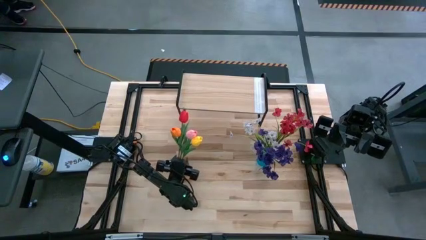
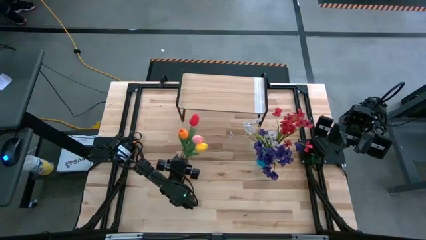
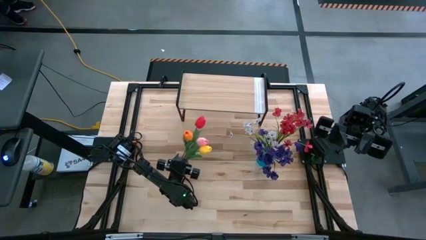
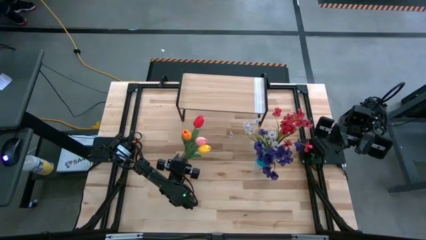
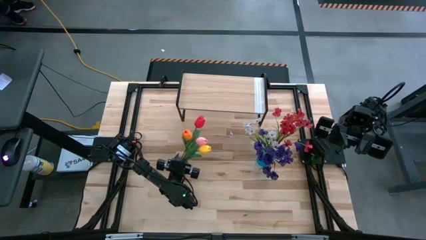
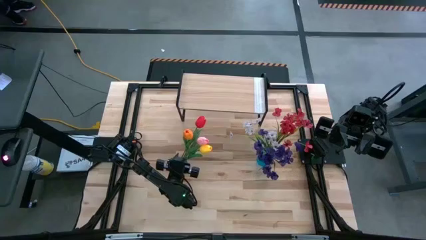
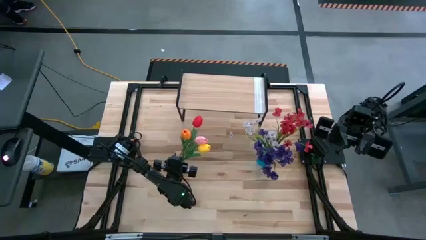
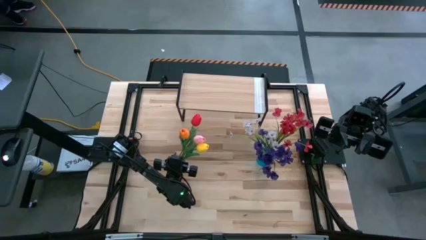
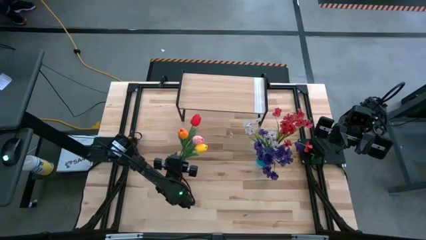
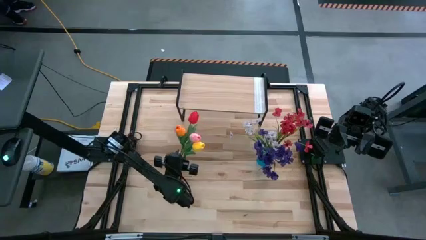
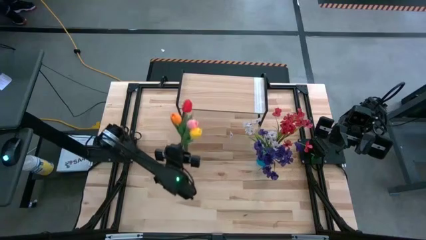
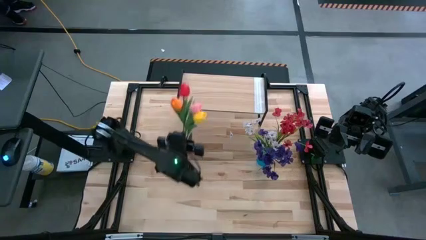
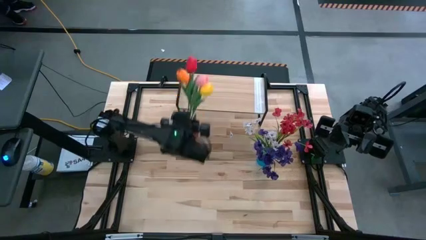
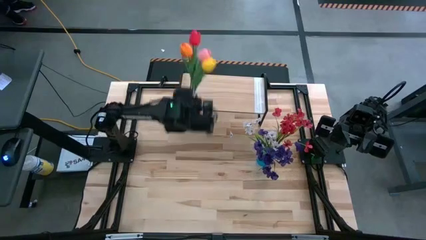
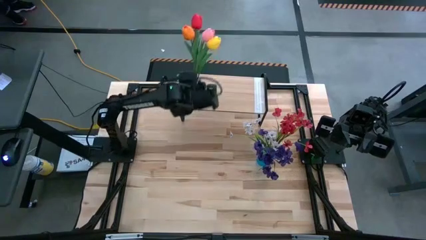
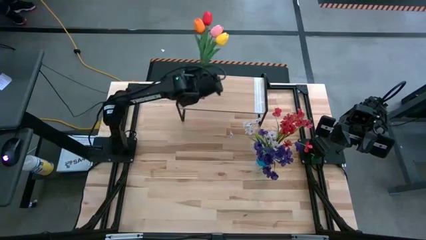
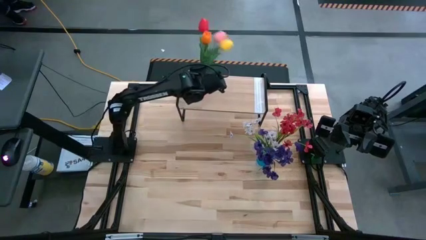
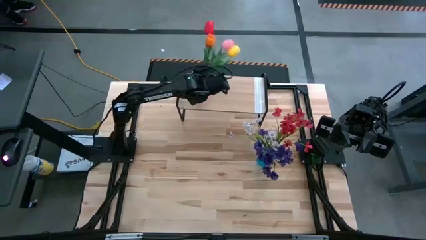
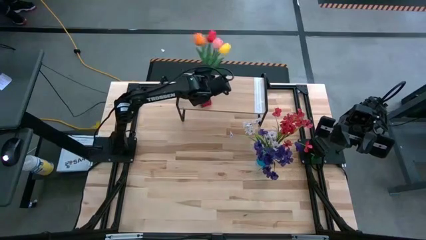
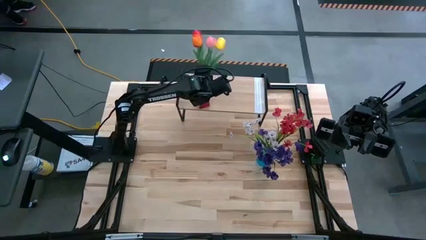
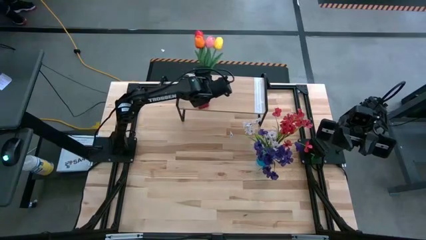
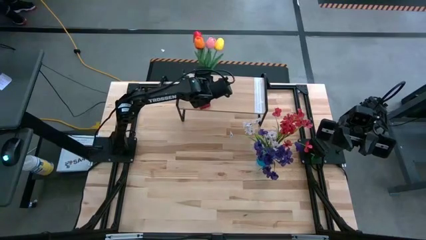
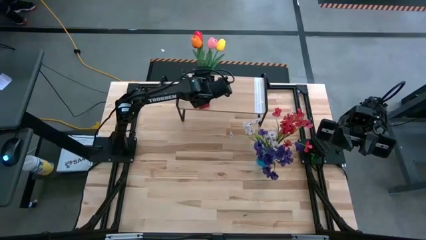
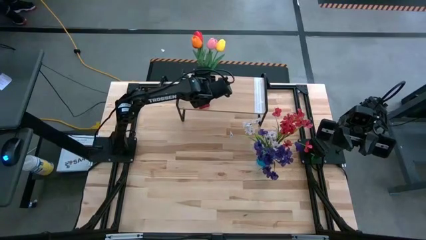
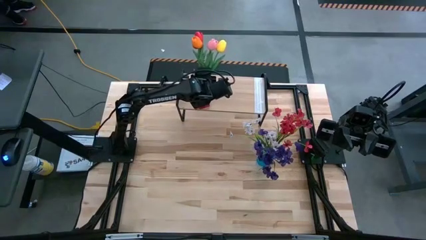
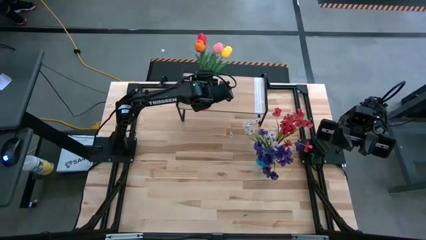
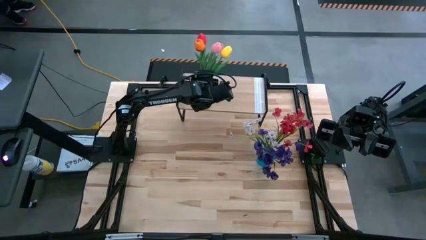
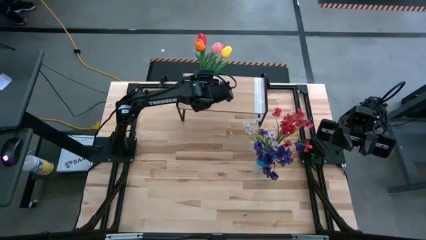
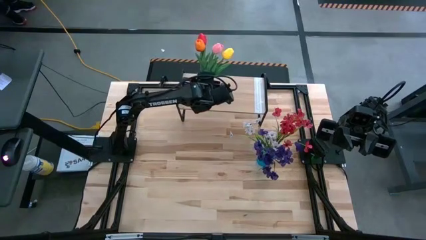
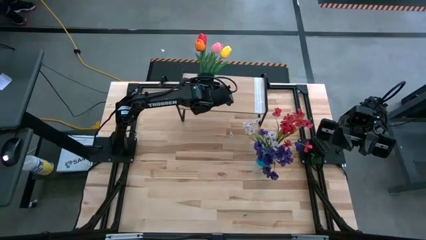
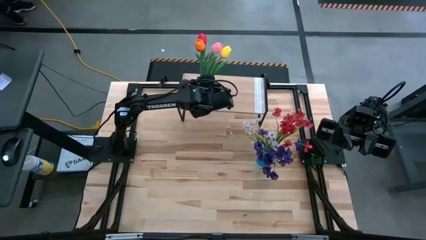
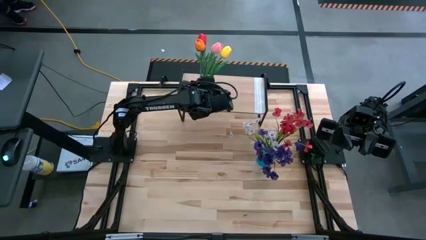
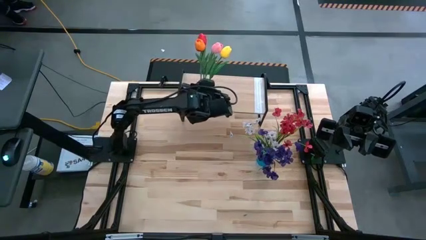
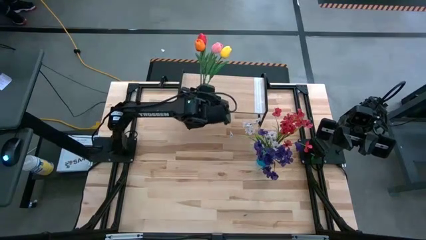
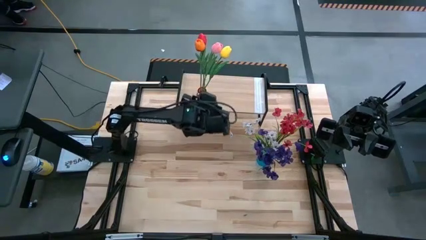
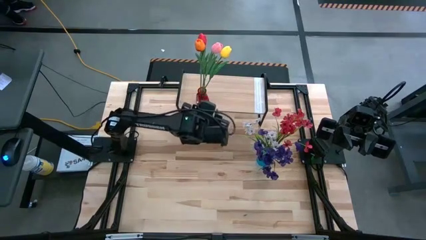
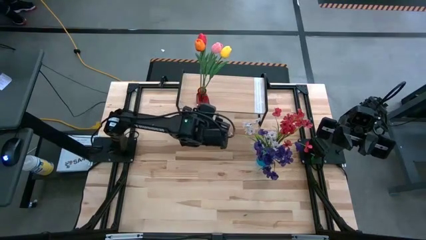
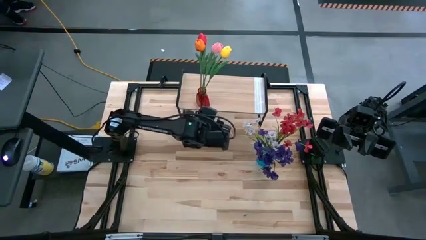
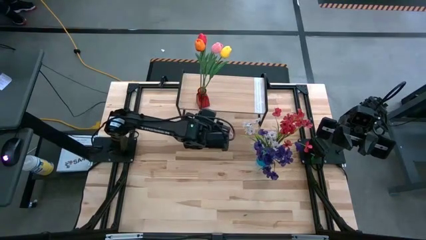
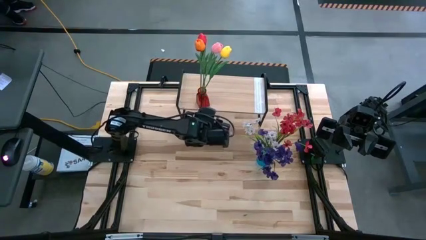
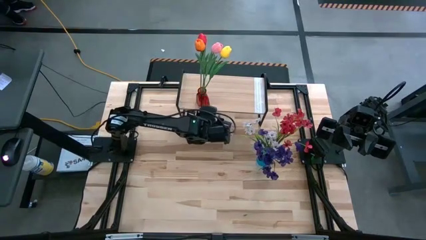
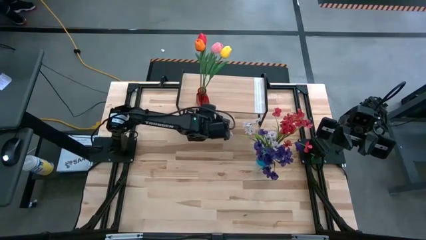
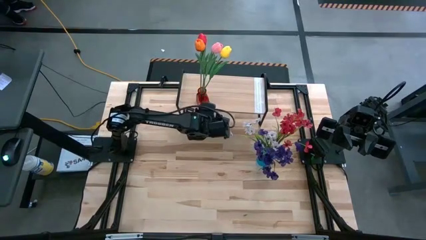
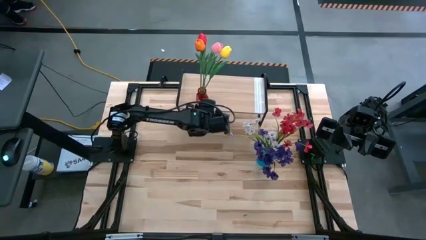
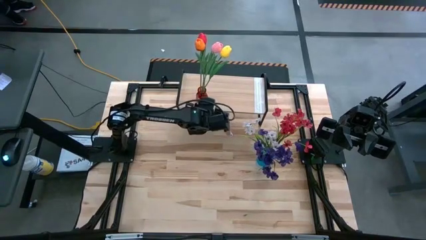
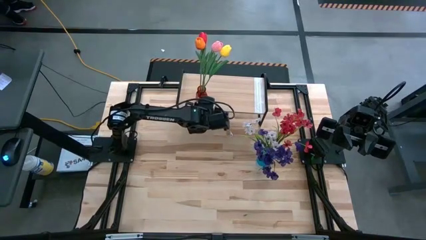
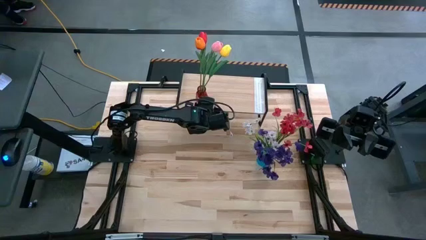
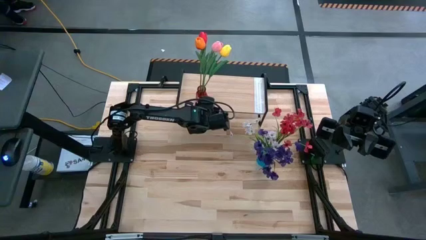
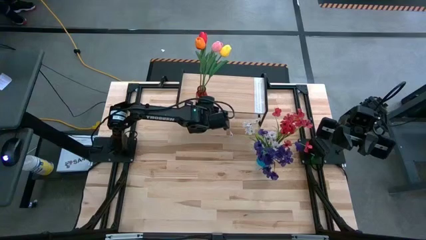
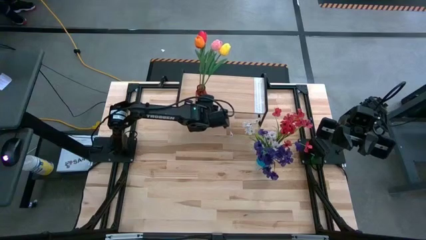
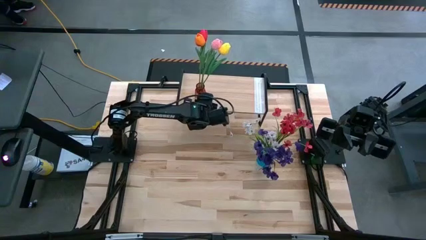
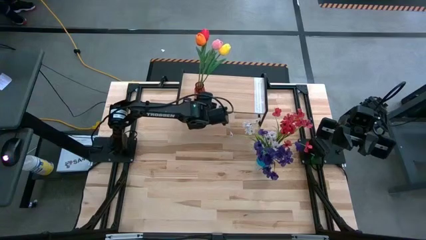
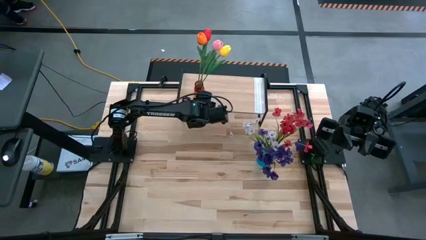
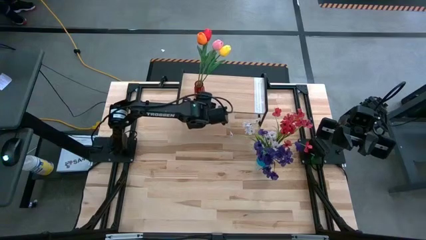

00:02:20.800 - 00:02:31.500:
Task: Pick and place flowers into a vace then onto a shelf
Put the red vase with flowers on the shelf

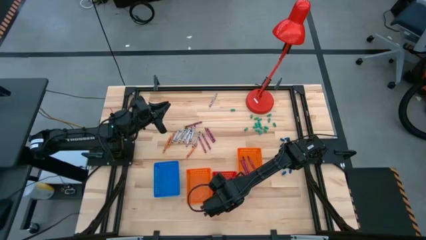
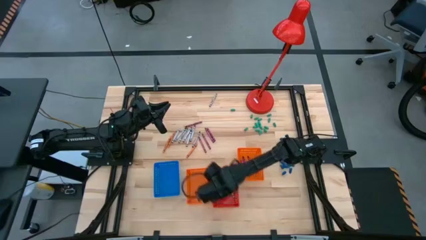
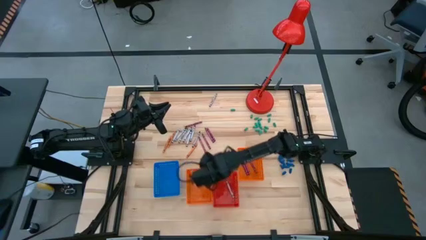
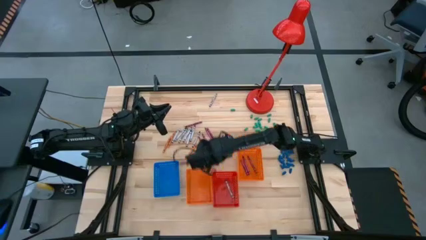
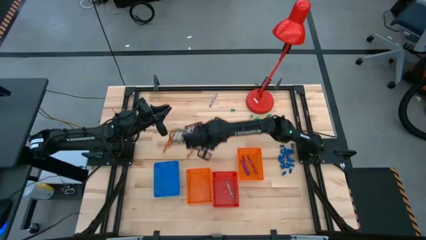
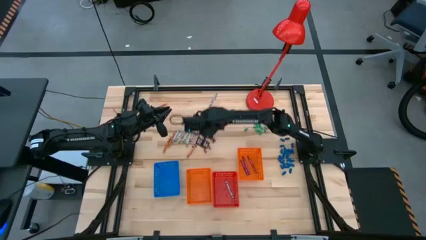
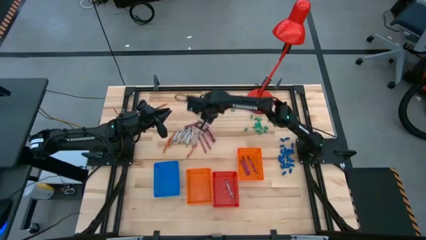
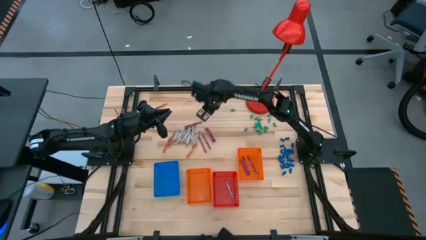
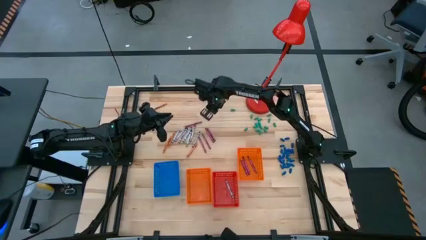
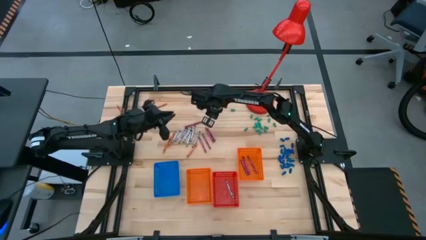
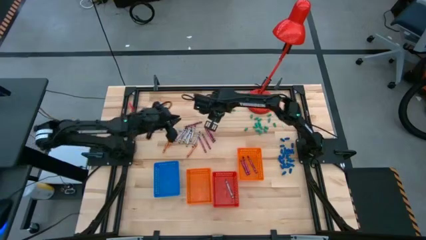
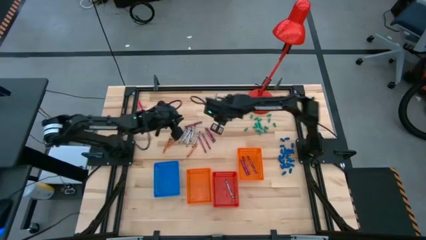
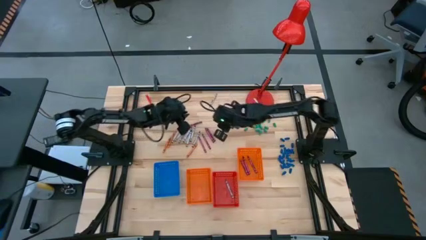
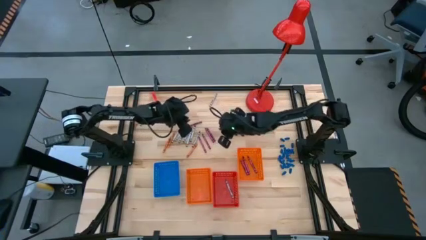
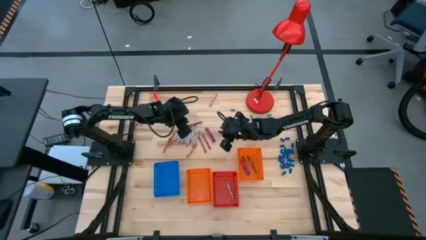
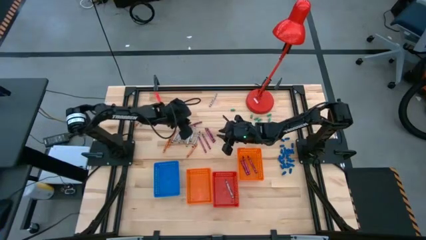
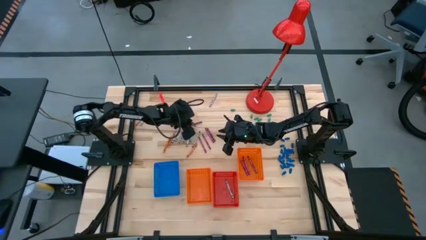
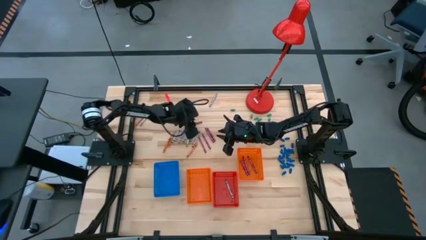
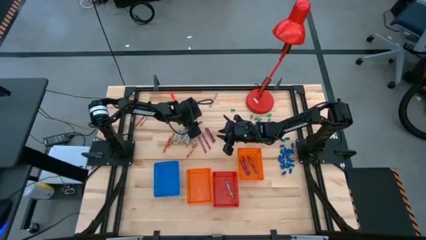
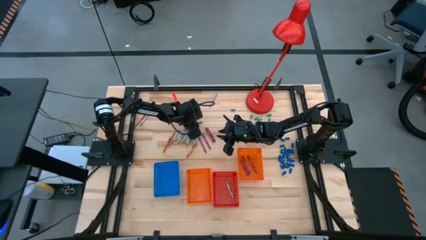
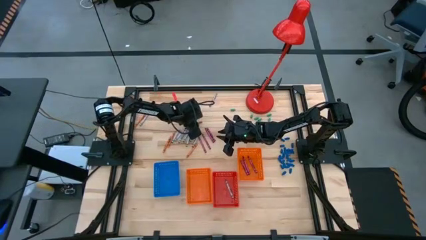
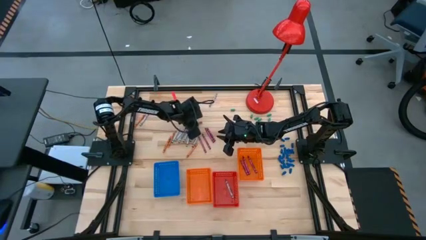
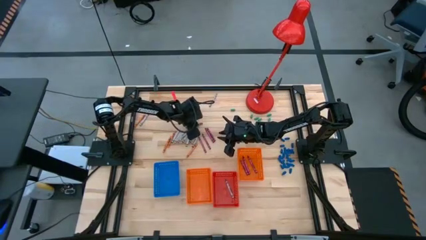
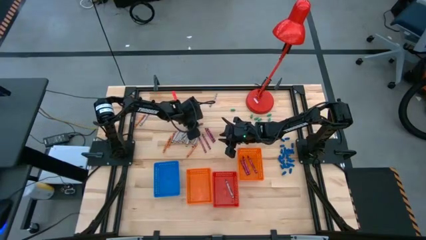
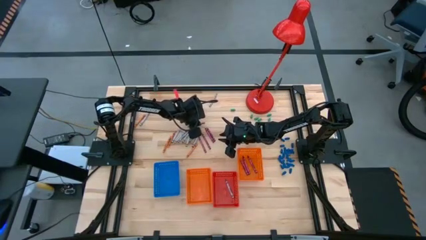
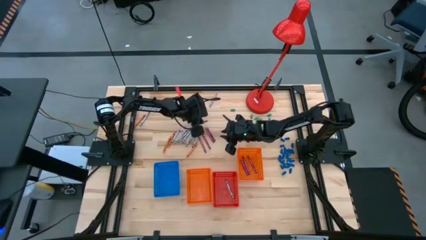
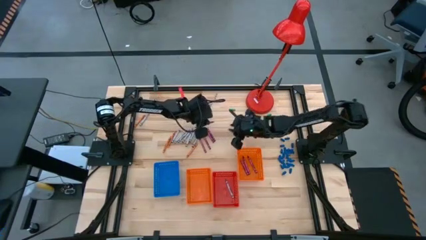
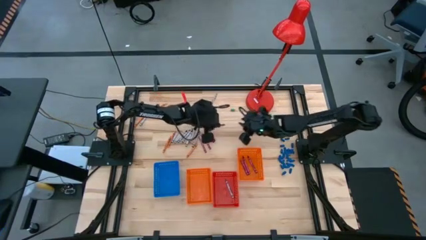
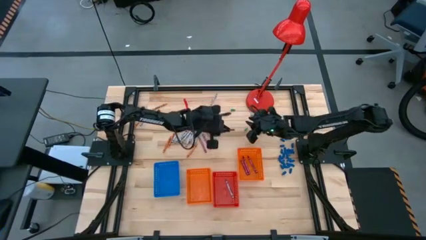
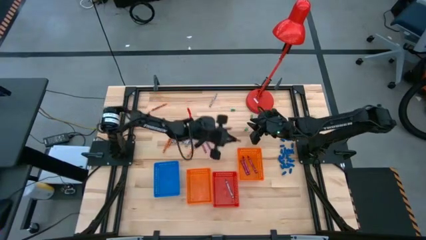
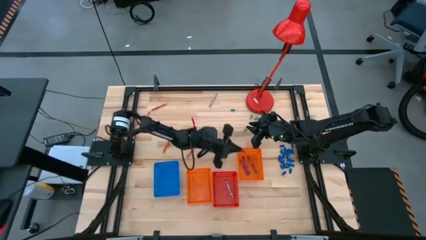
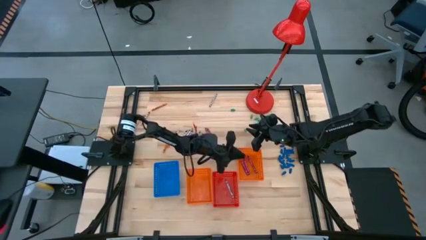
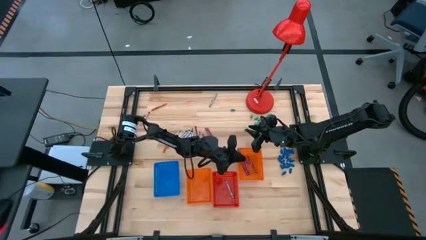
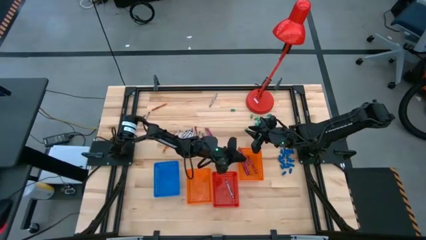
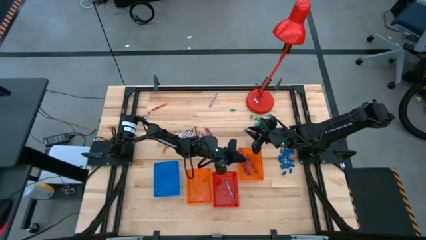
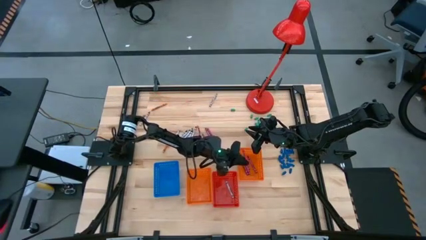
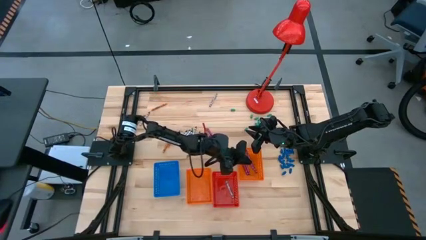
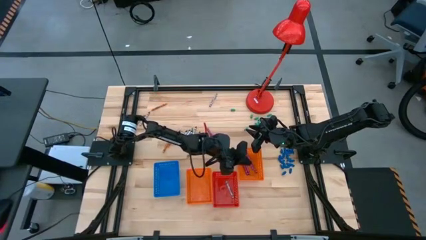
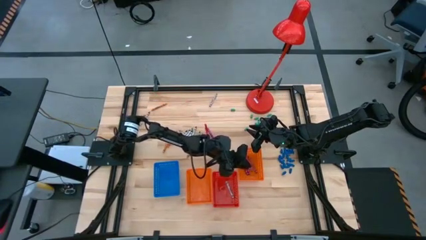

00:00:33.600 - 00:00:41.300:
Task: Sort crayons
Put the red crayon into the right orange bin
